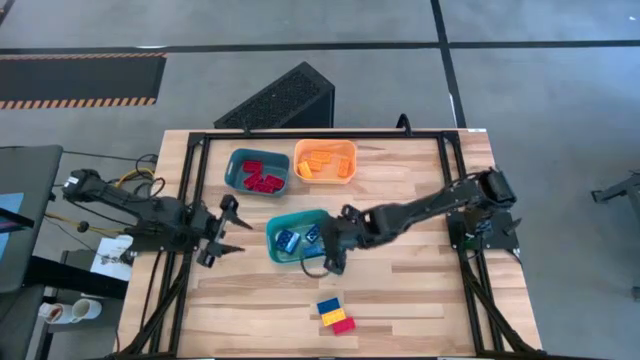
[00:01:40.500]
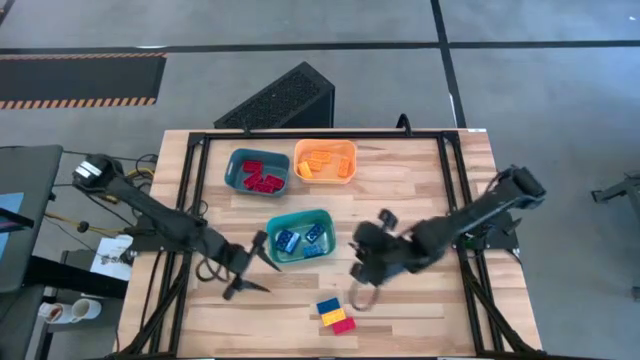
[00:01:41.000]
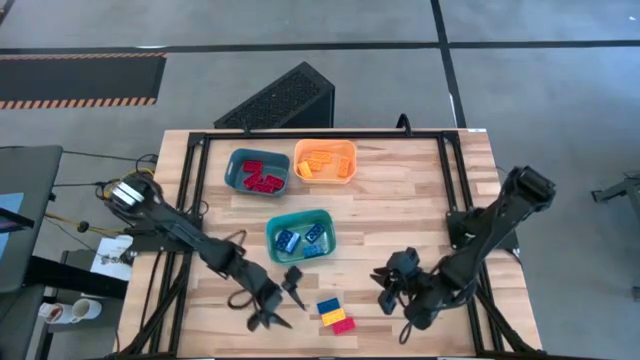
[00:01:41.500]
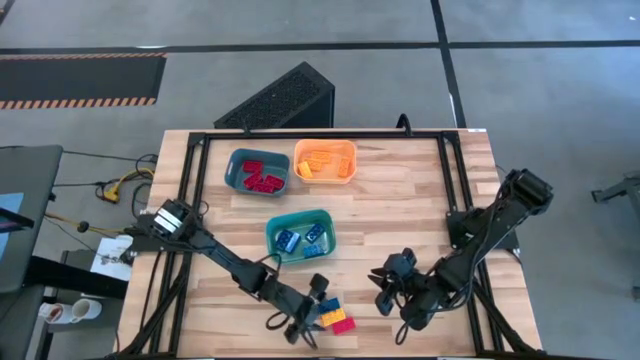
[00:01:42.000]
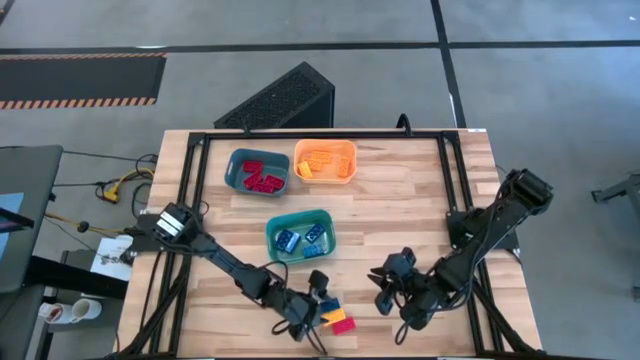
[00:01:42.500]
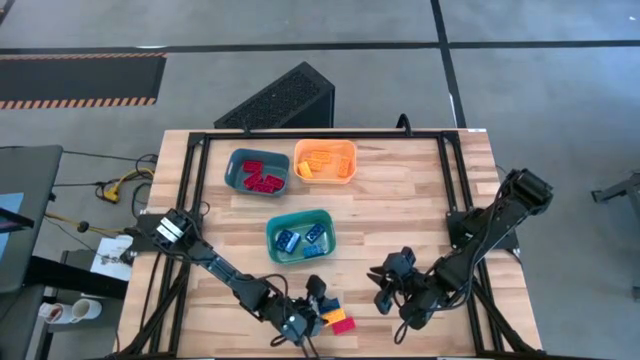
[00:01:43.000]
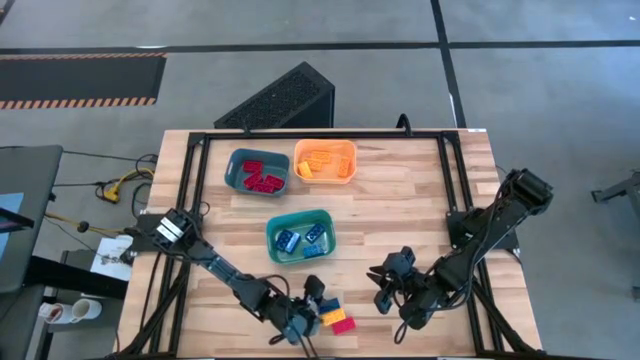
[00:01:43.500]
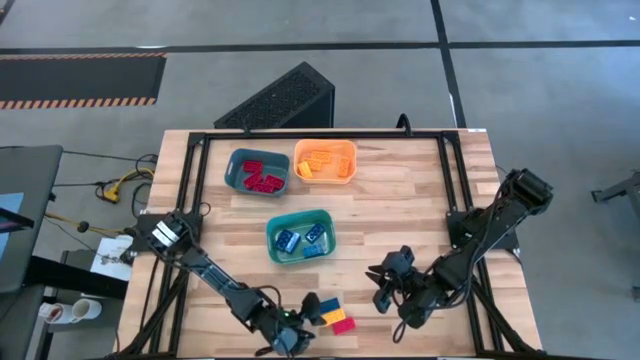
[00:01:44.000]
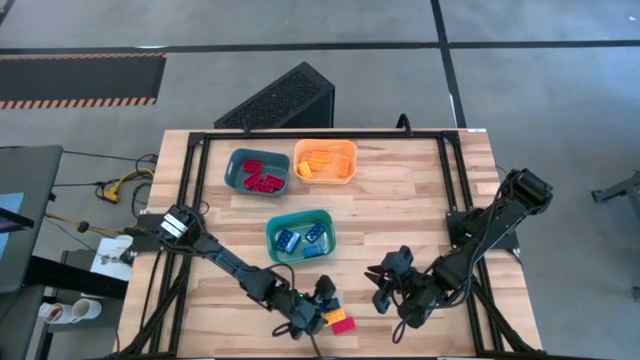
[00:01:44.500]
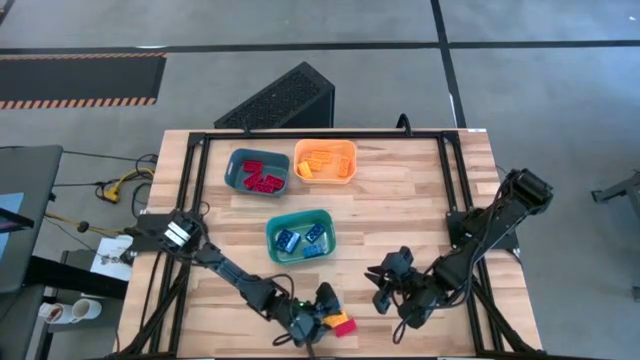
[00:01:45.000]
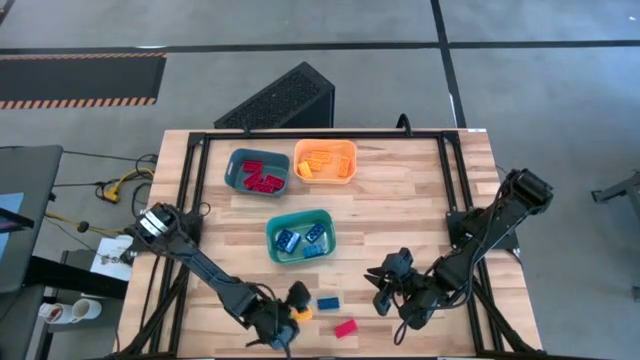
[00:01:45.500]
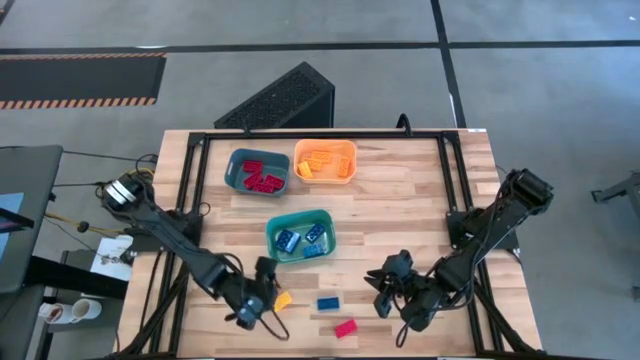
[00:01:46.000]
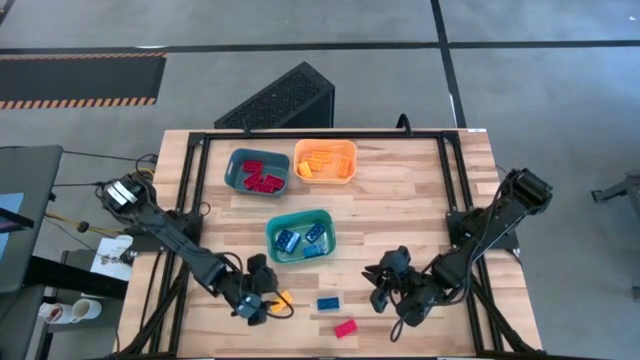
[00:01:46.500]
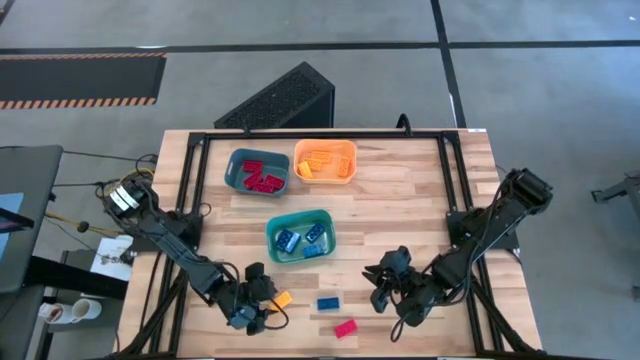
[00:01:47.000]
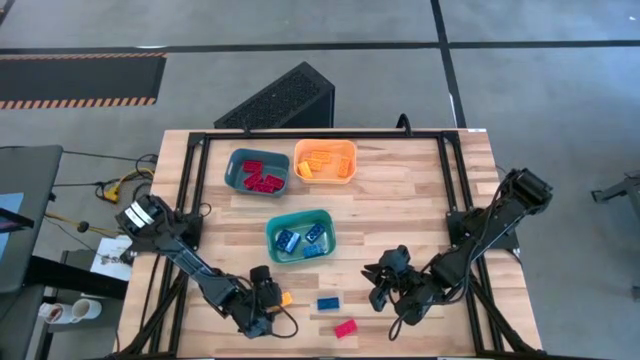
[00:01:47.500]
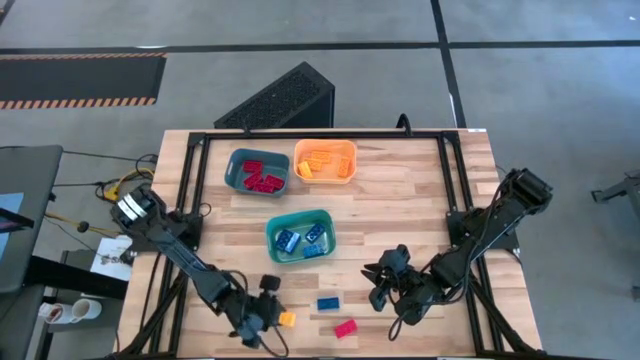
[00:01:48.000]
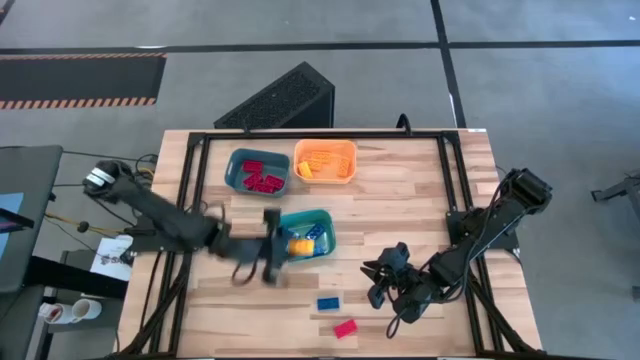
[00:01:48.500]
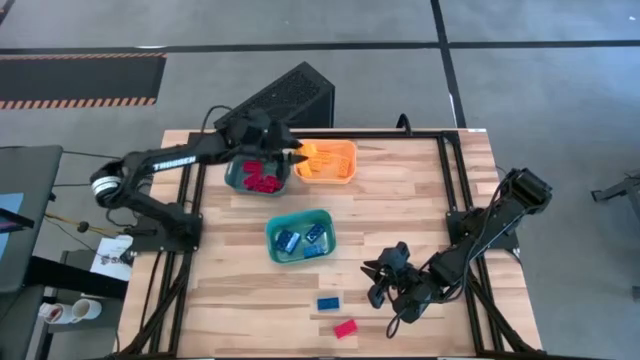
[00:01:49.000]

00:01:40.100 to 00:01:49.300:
Task: Sort & place blocks by color
Put the yellow game piece into the orange bin

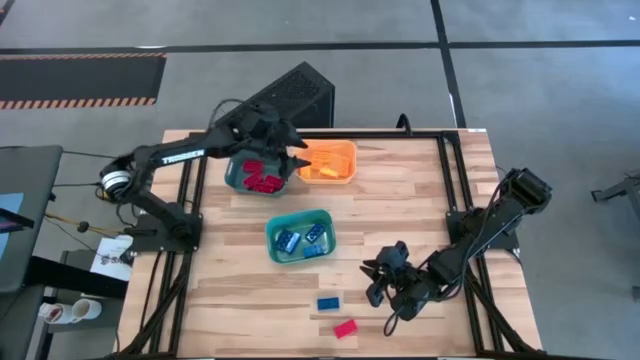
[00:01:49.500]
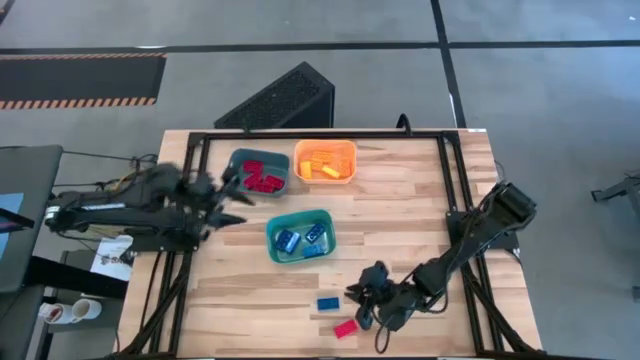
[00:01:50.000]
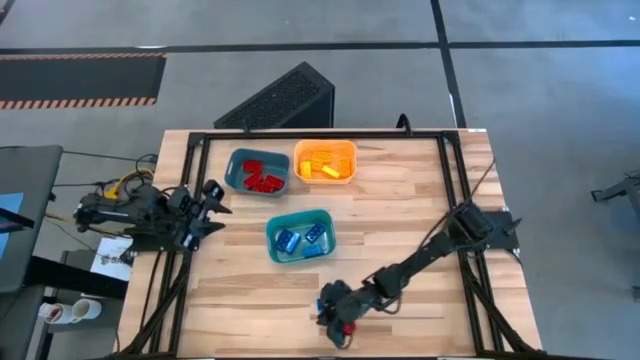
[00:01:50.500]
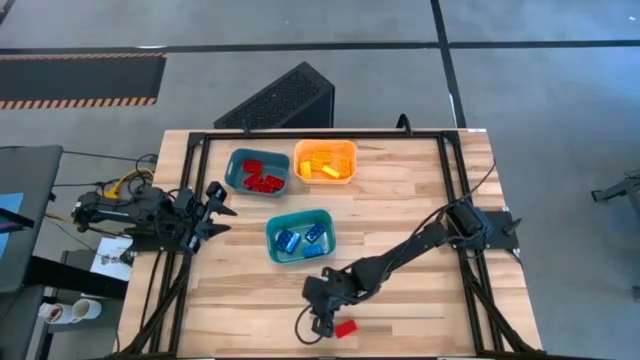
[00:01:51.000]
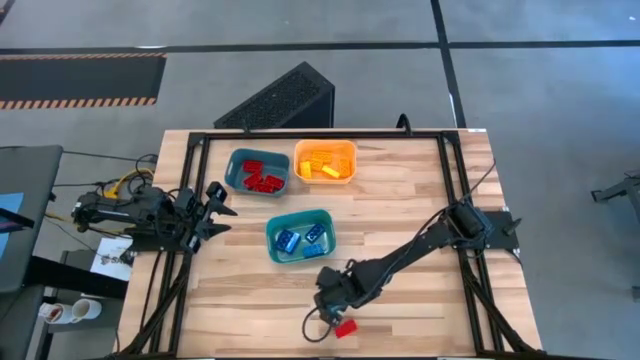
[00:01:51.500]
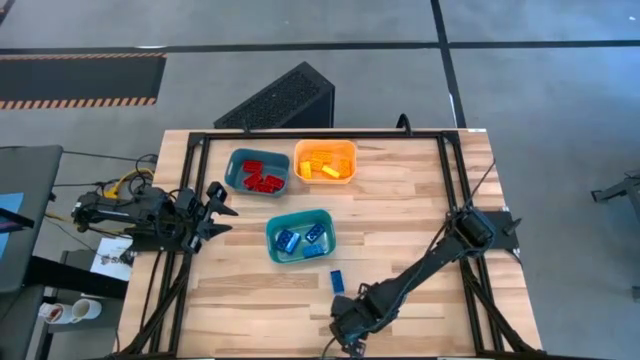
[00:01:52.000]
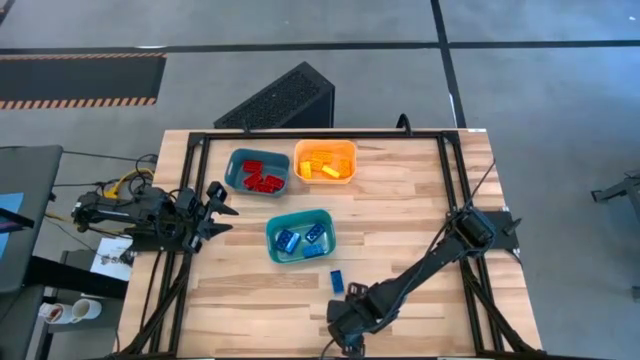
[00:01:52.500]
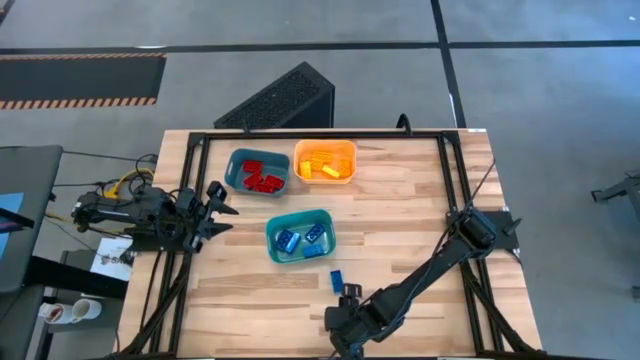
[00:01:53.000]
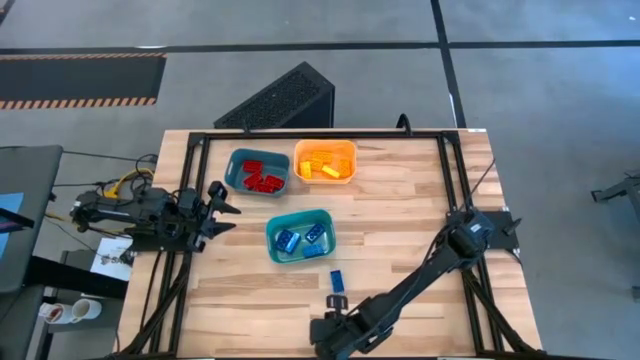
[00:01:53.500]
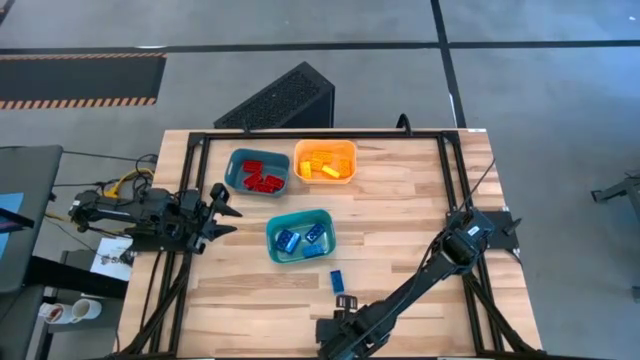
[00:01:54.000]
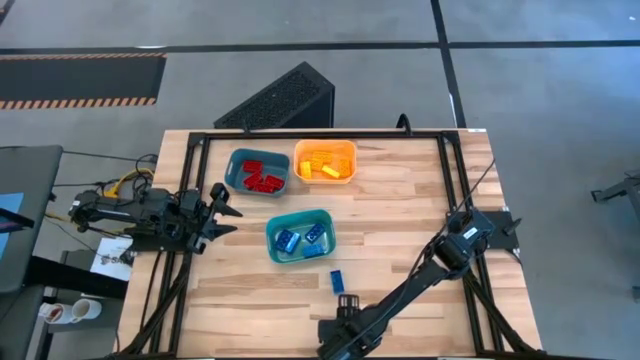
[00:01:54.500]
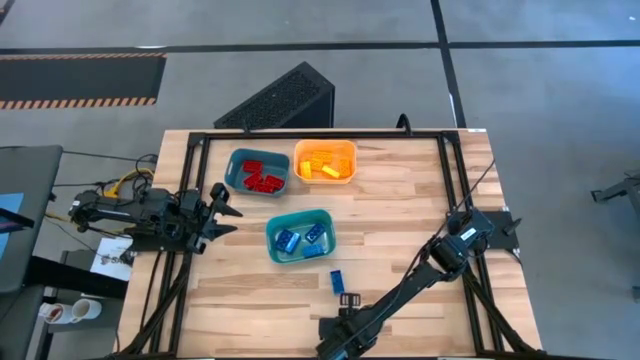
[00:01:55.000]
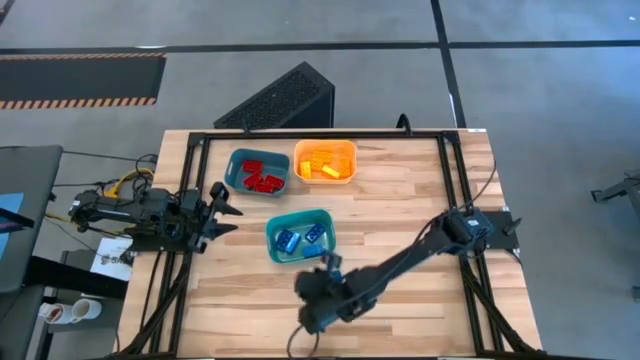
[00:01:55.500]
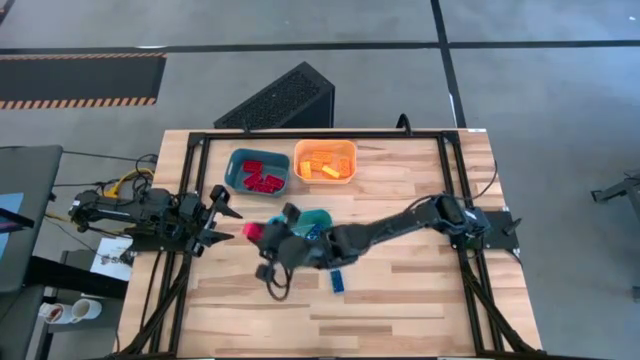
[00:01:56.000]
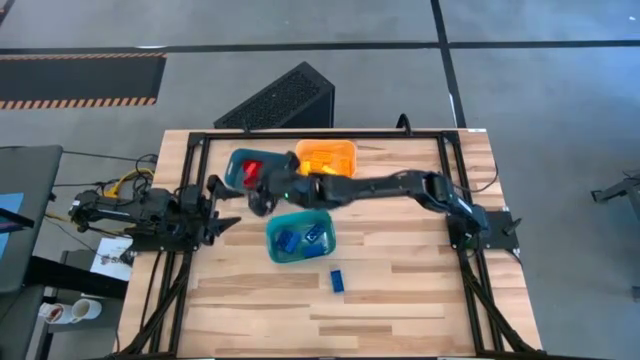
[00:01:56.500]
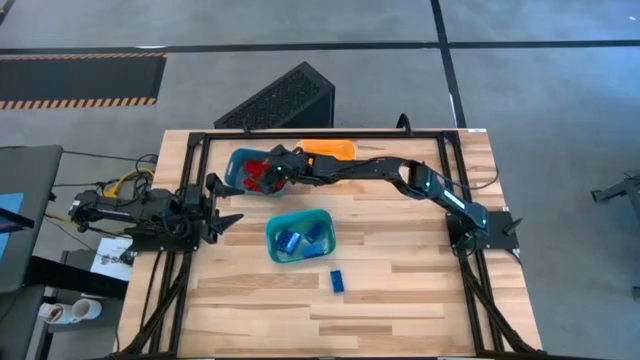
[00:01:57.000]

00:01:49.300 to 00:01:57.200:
Put the red game piece into the blue bin

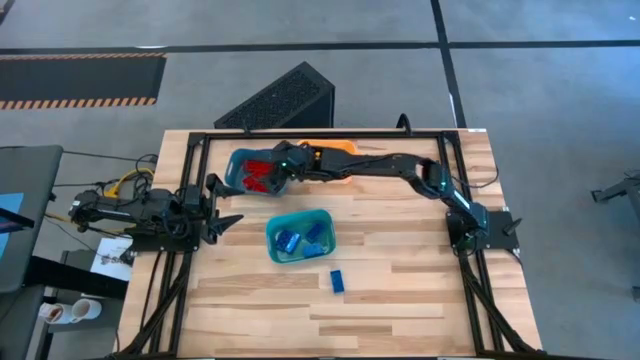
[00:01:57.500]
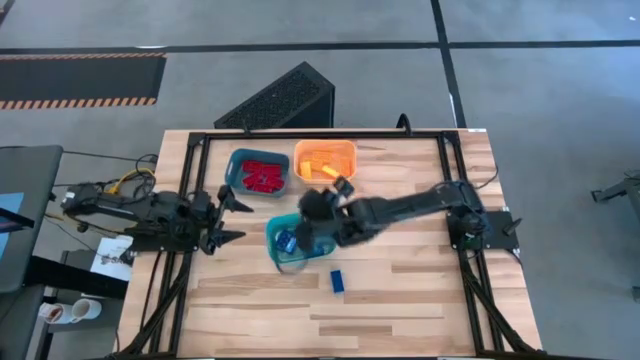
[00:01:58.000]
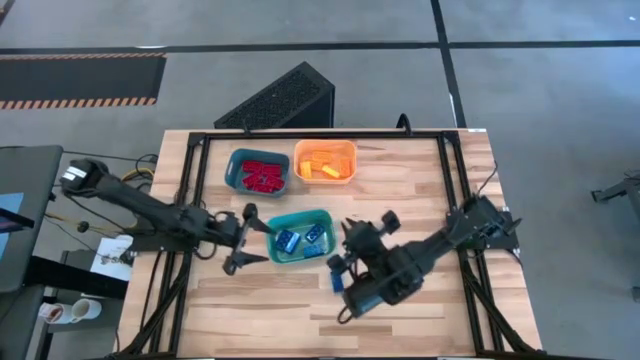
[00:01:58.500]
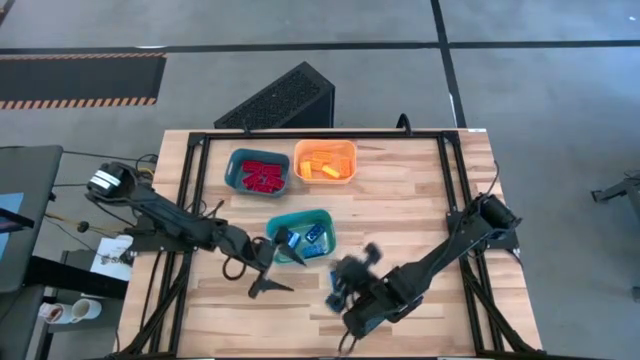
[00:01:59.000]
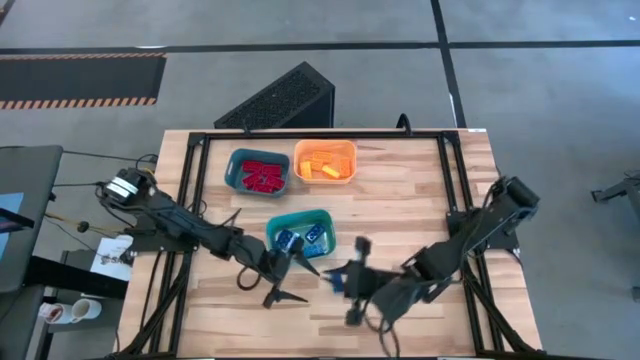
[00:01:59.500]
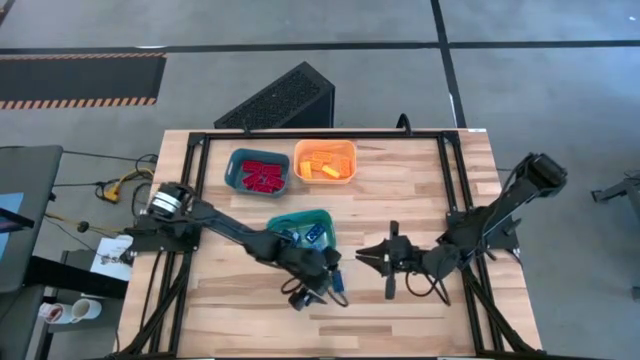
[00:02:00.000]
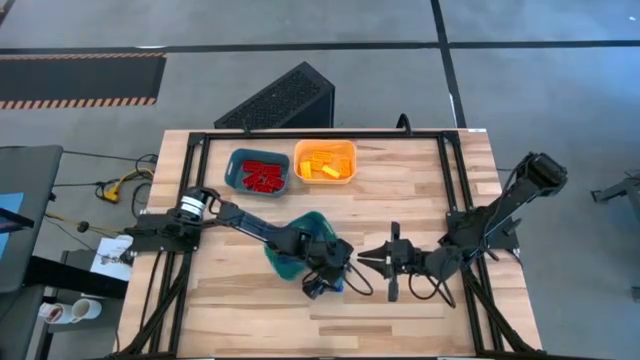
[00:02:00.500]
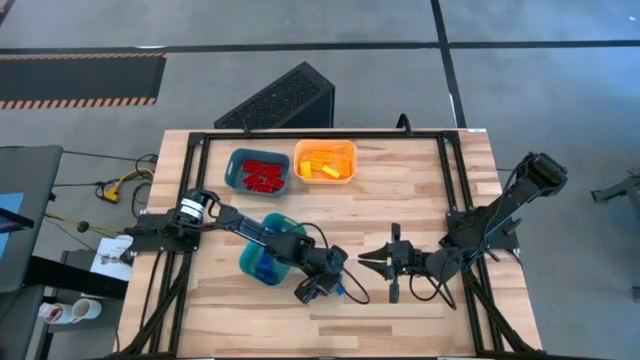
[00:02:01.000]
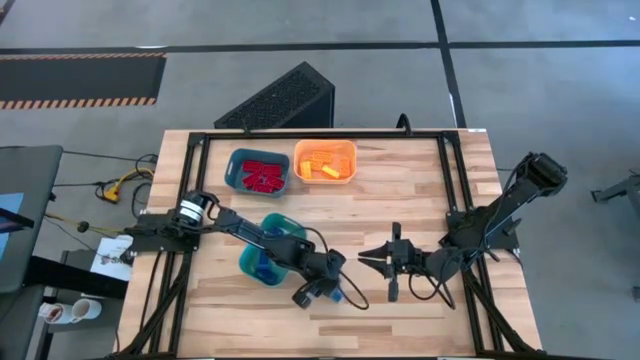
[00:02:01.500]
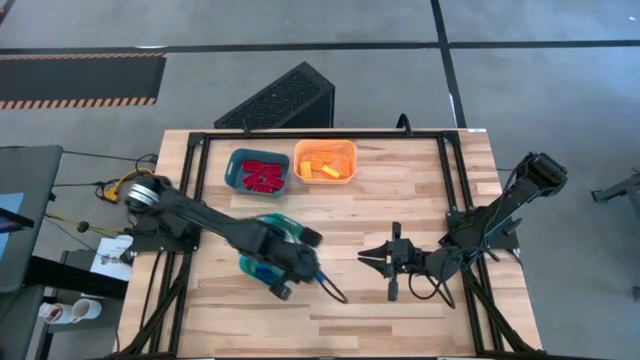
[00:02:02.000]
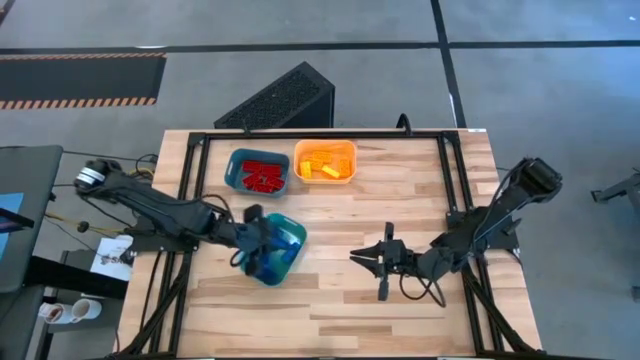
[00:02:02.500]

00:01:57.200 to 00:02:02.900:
Put the blue game piece into the green bin
